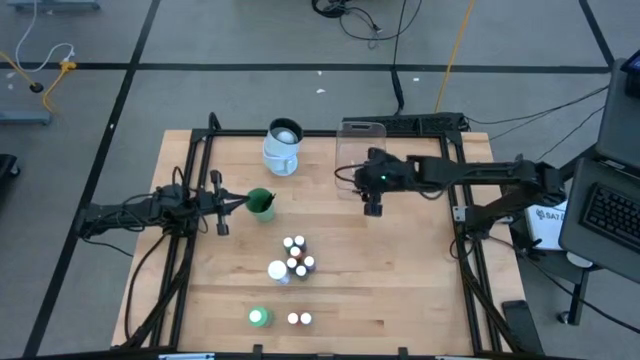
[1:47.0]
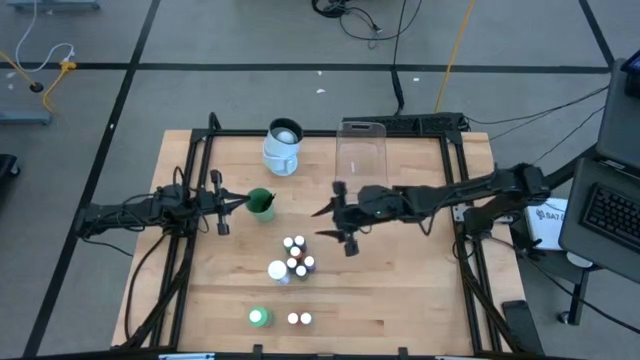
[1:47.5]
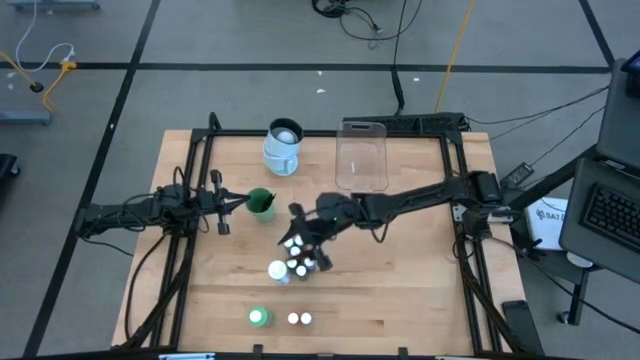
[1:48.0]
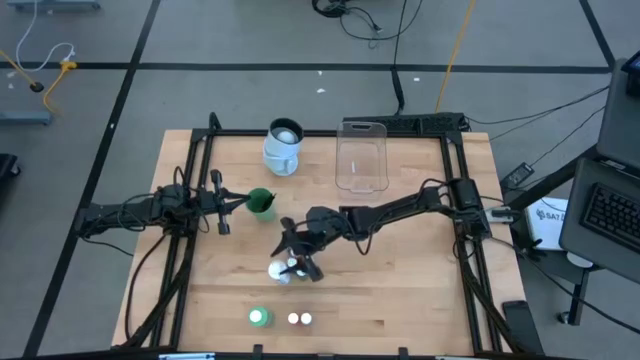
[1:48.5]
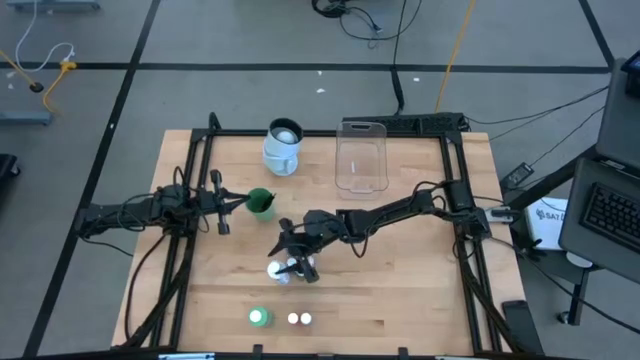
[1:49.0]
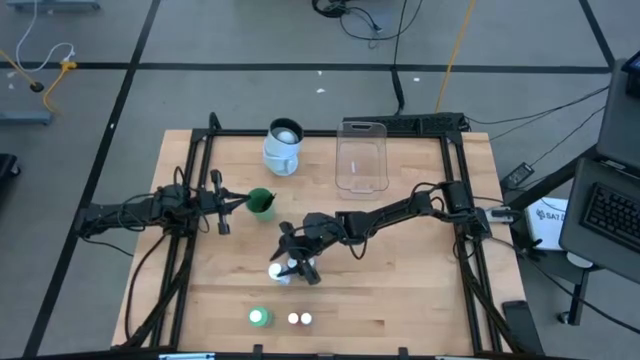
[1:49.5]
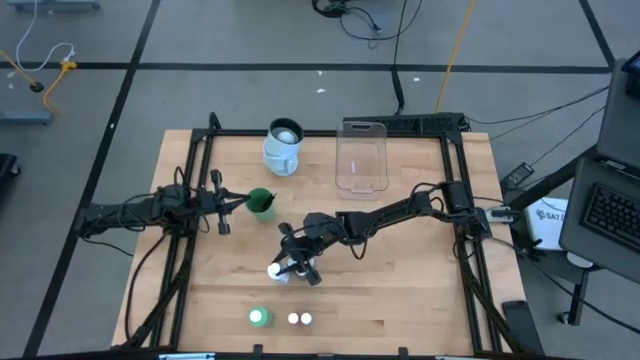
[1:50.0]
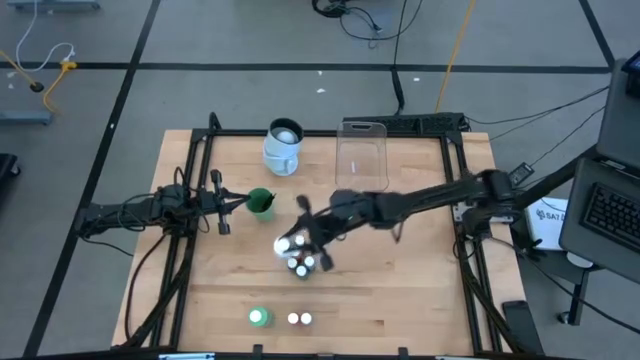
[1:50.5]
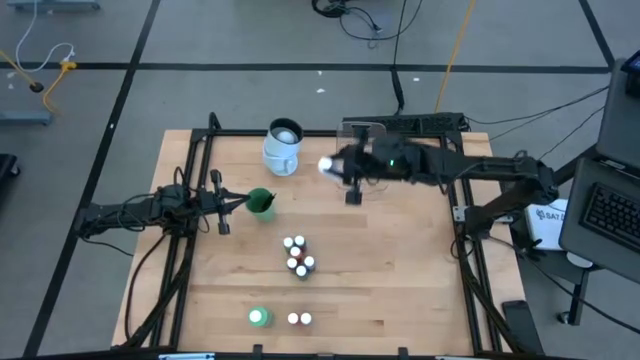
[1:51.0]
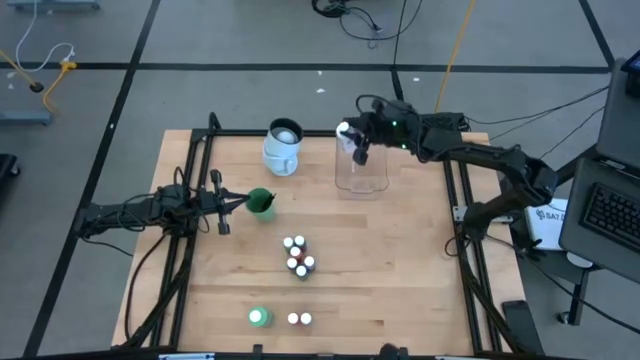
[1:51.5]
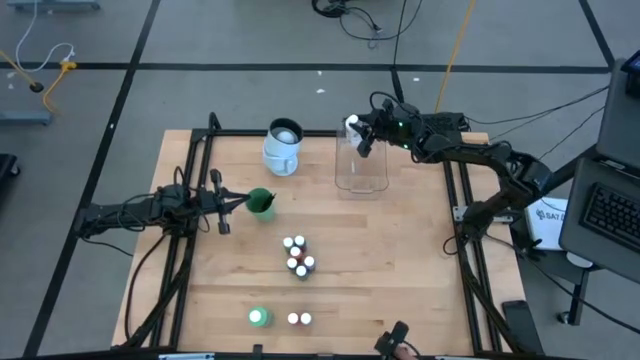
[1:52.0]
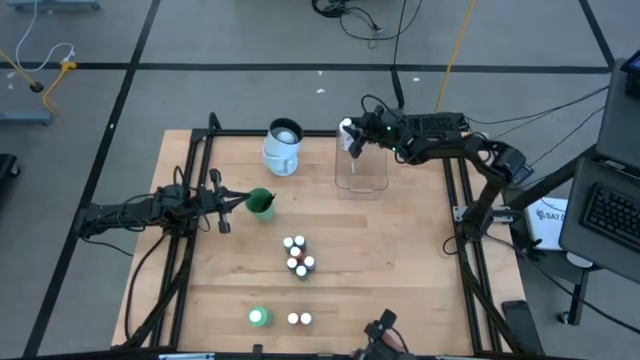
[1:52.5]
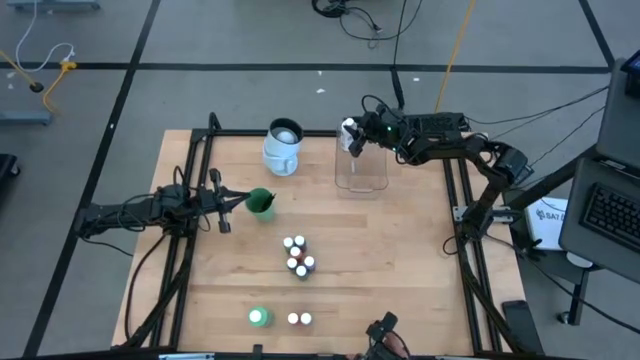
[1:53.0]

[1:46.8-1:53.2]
Task: Pick & Place Paint Supplies
Put the white paint bottle into the transparent bin

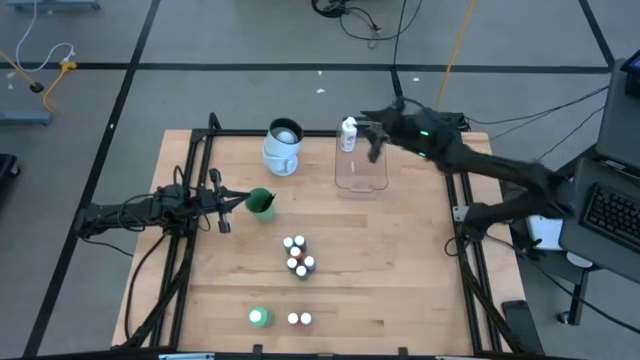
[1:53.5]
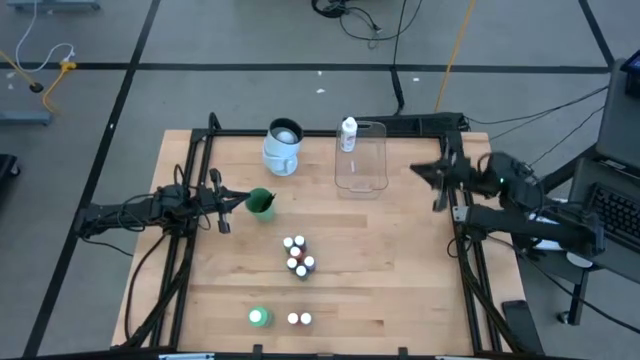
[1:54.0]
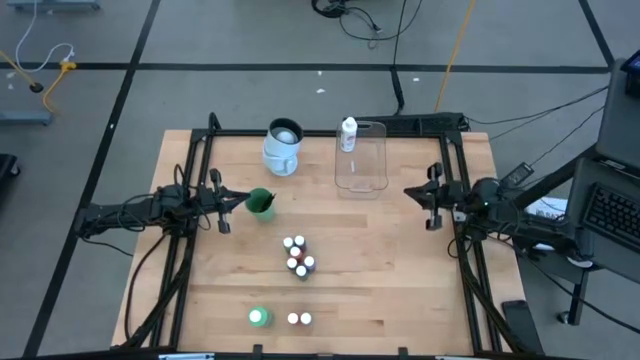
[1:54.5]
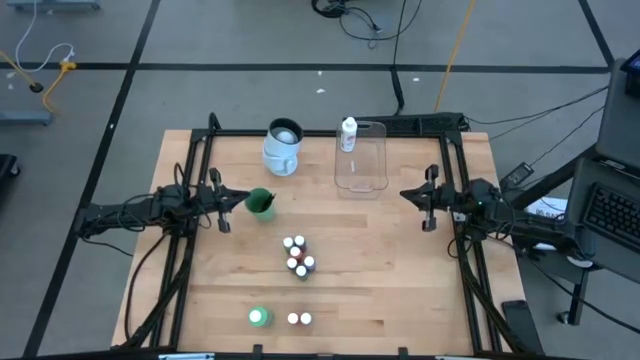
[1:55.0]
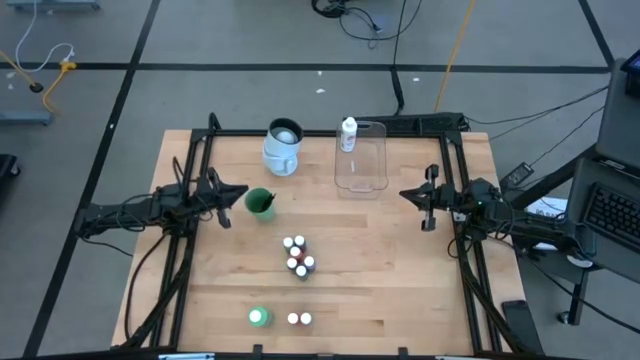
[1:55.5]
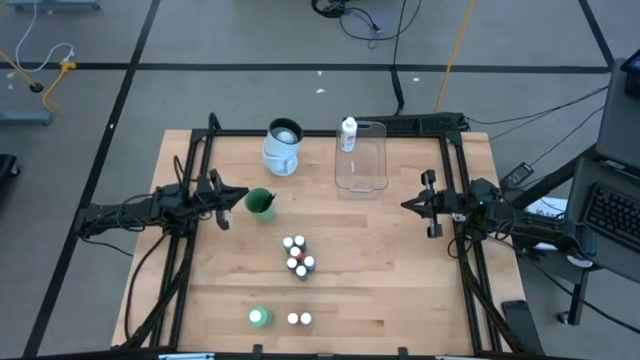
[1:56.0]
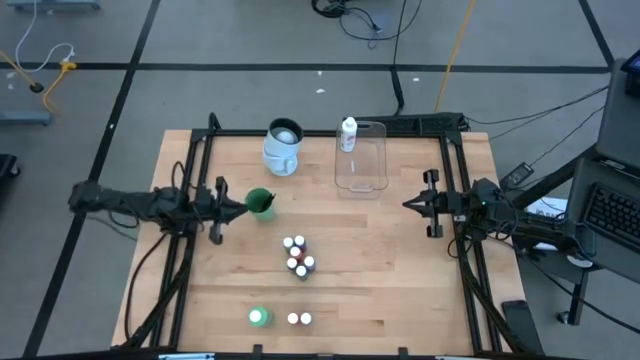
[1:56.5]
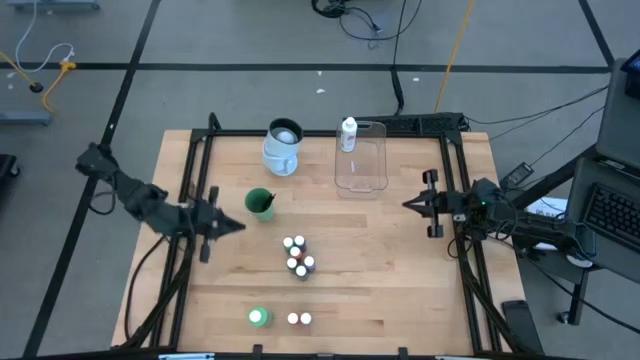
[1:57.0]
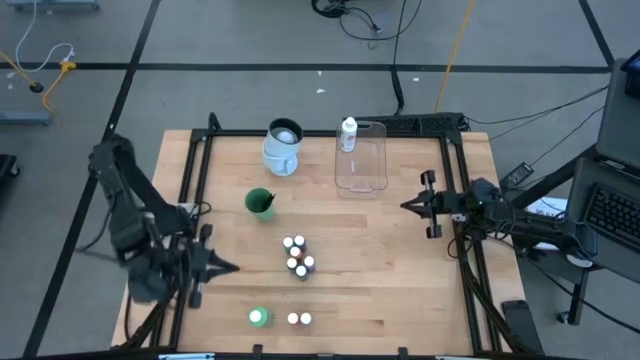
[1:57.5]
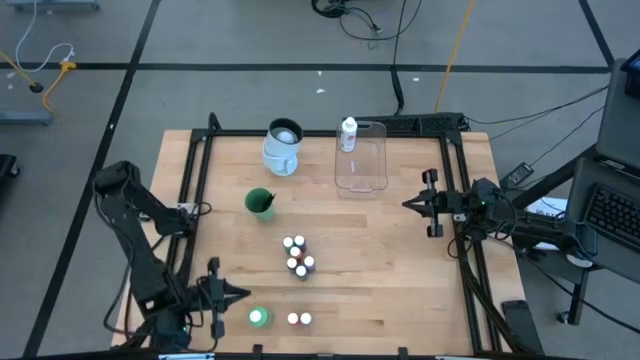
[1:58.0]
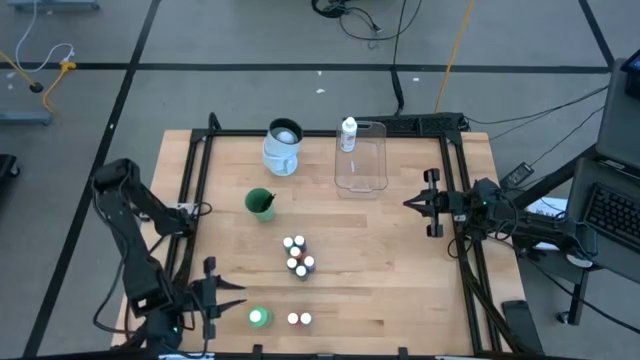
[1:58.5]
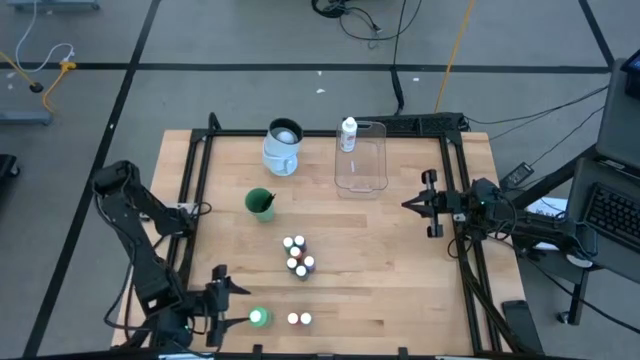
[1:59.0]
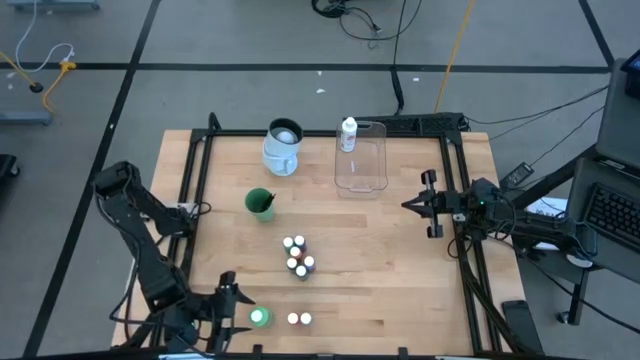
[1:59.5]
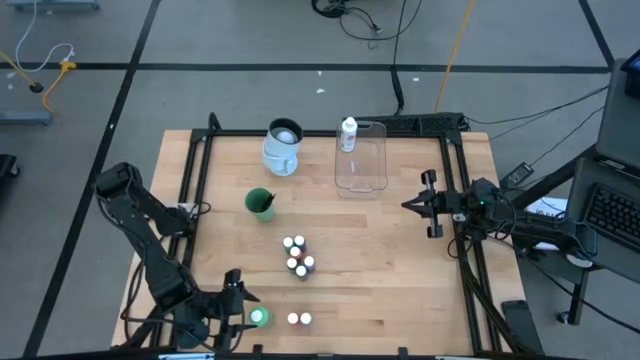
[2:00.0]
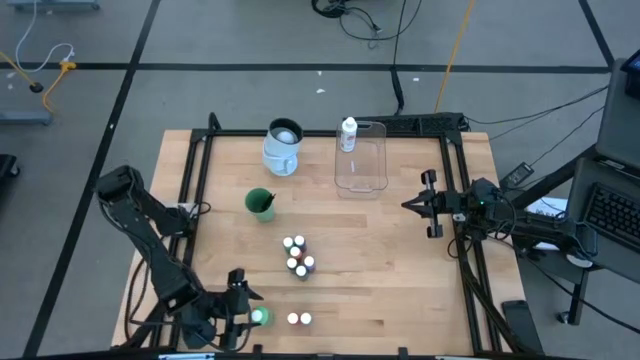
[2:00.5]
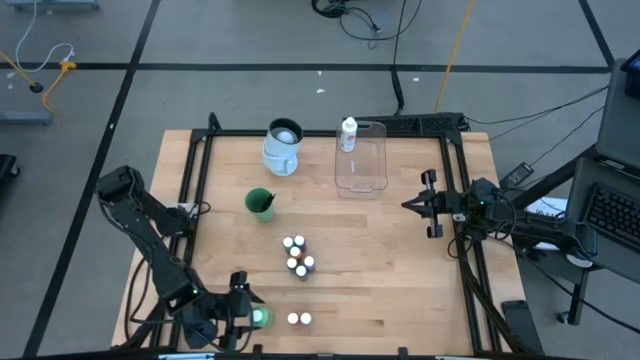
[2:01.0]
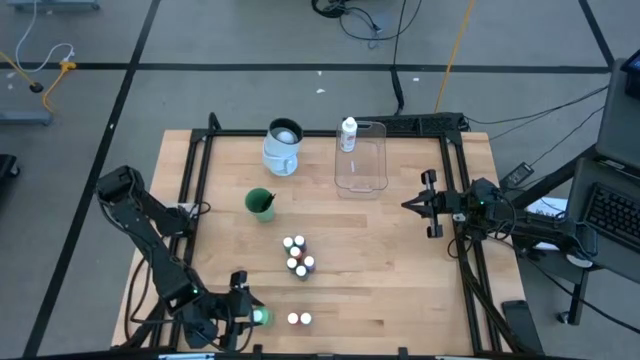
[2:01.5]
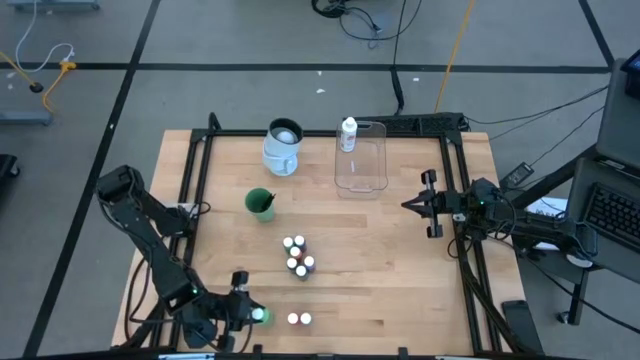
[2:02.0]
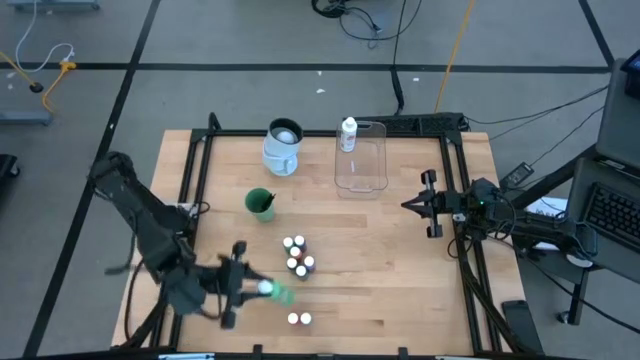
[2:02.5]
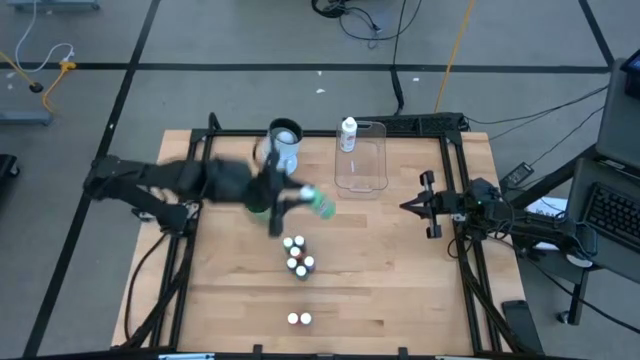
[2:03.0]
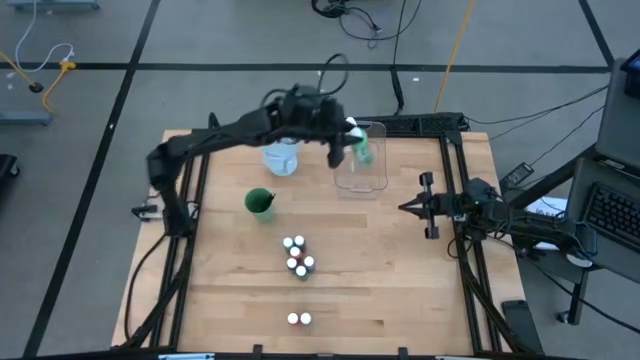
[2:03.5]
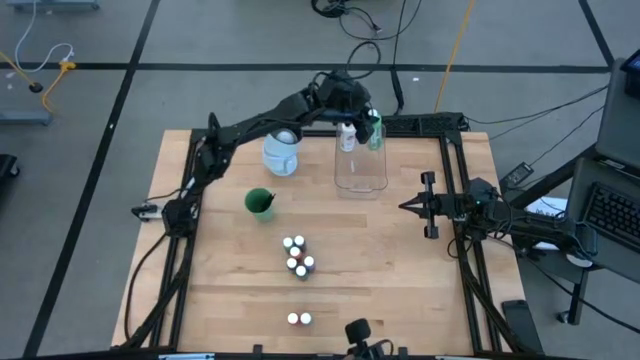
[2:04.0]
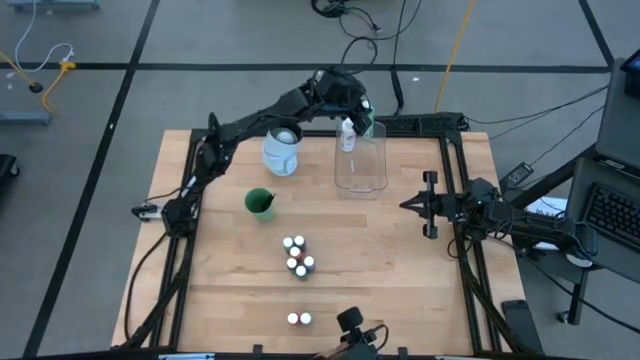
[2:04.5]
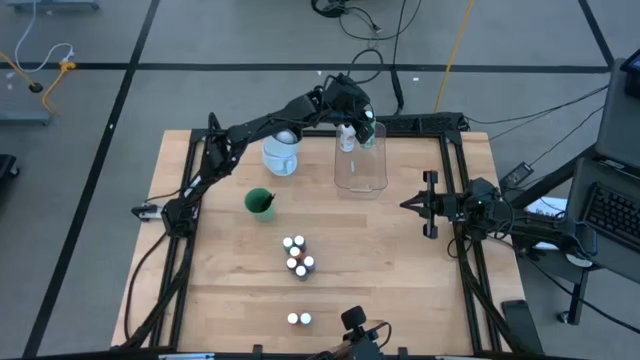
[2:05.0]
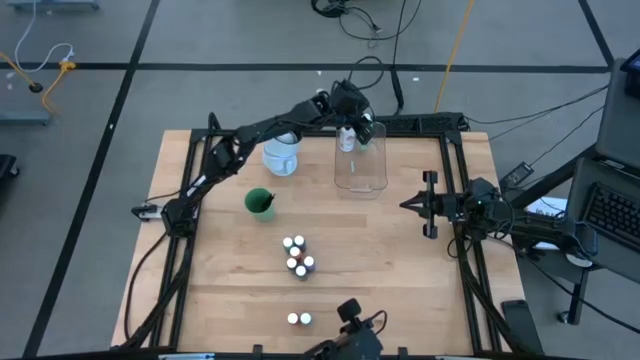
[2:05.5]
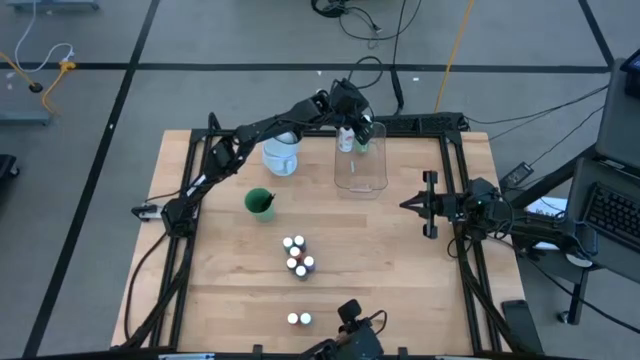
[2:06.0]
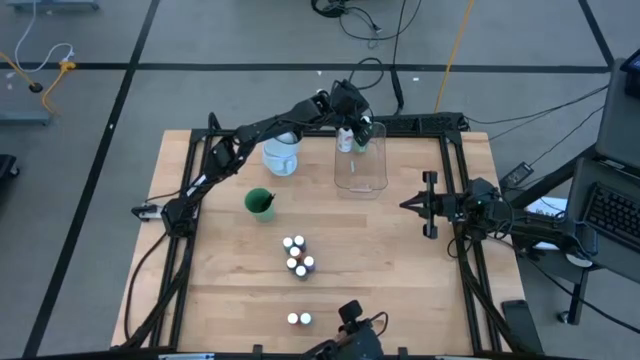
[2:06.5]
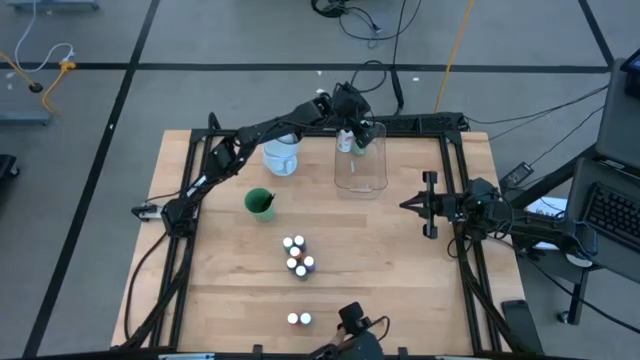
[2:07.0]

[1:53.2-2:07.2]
Put the light green paint bottle into the transparent bin
